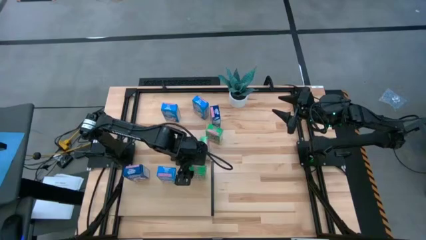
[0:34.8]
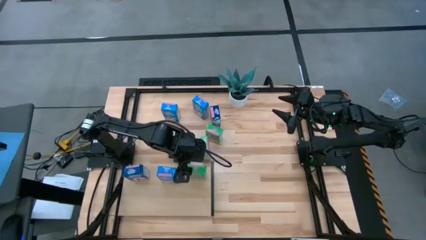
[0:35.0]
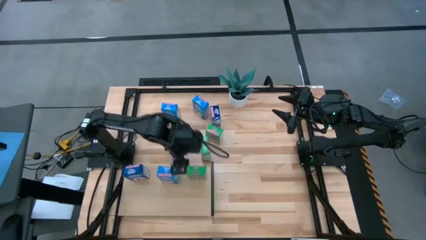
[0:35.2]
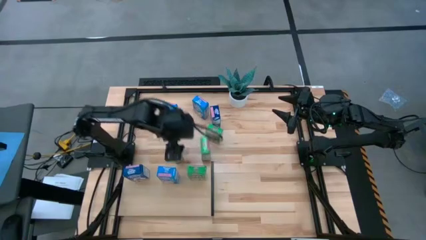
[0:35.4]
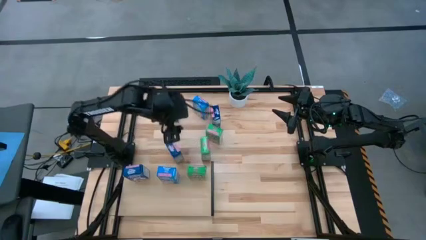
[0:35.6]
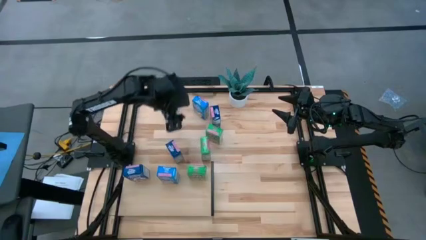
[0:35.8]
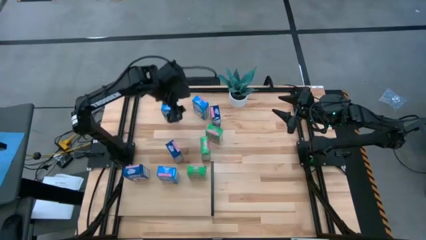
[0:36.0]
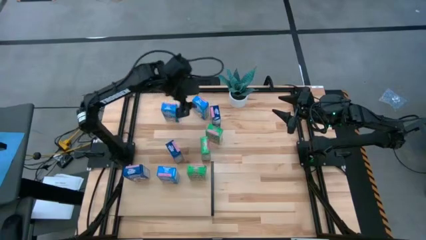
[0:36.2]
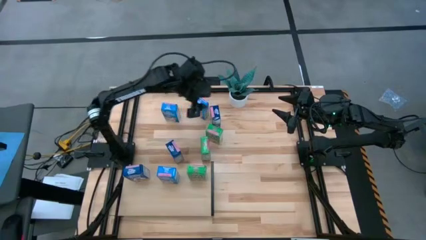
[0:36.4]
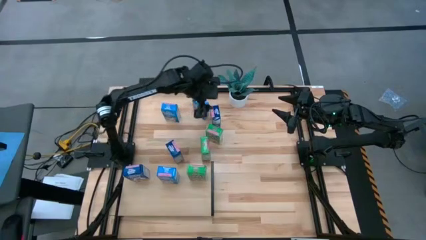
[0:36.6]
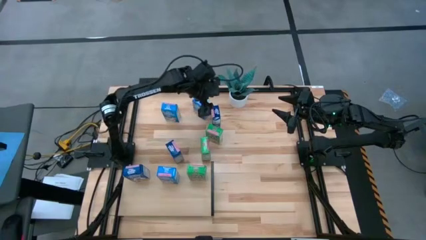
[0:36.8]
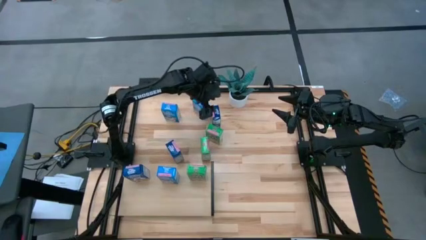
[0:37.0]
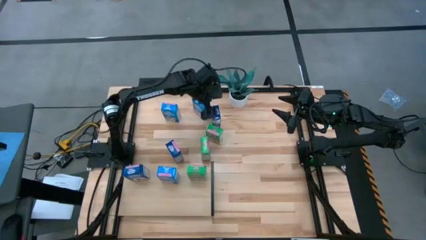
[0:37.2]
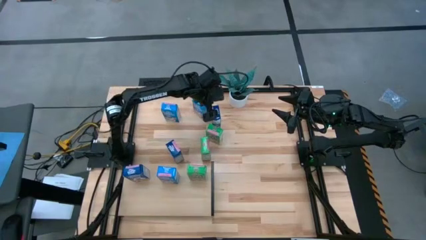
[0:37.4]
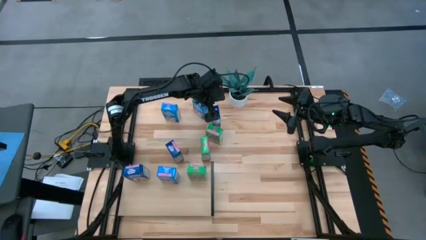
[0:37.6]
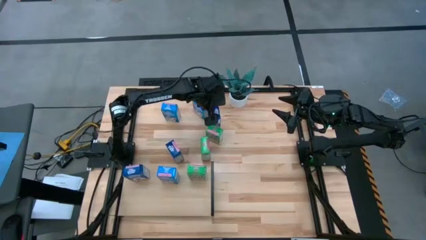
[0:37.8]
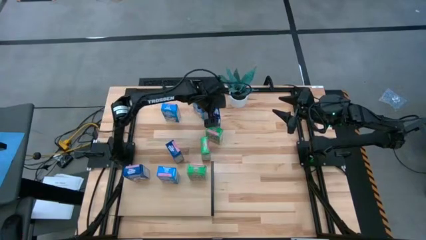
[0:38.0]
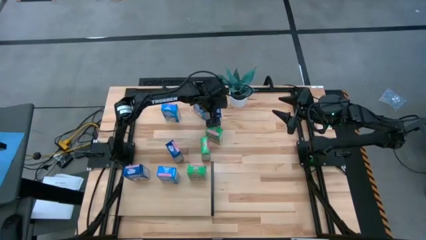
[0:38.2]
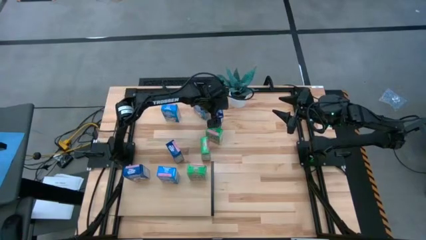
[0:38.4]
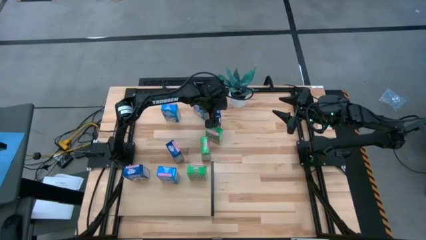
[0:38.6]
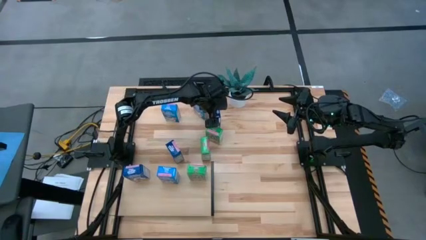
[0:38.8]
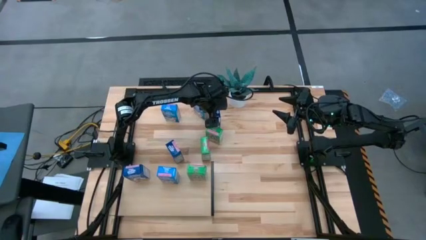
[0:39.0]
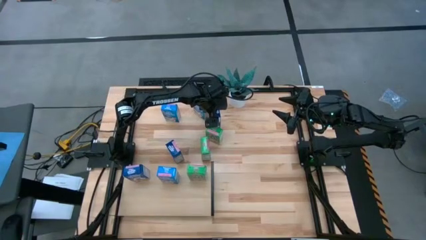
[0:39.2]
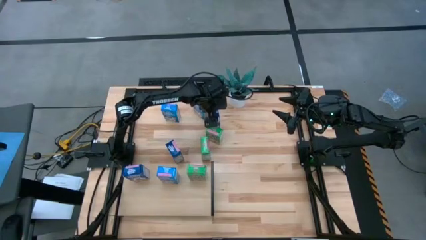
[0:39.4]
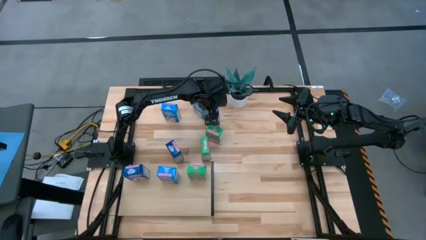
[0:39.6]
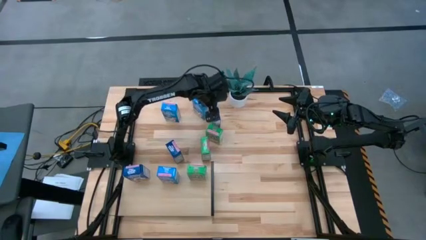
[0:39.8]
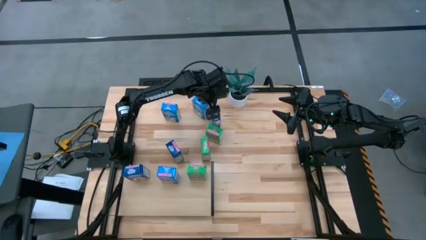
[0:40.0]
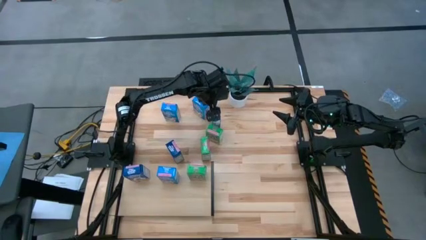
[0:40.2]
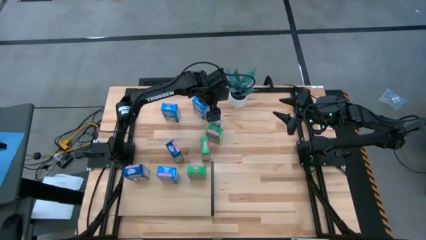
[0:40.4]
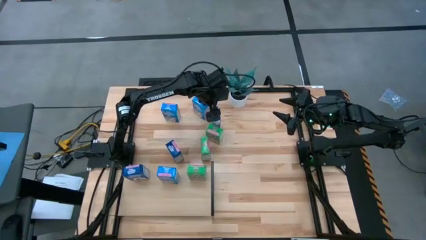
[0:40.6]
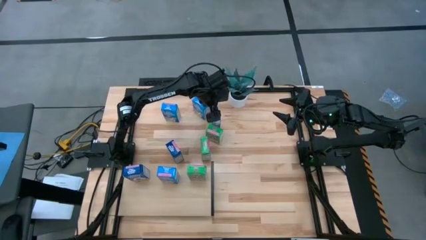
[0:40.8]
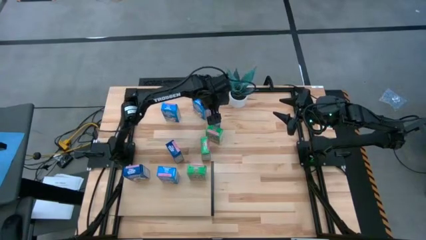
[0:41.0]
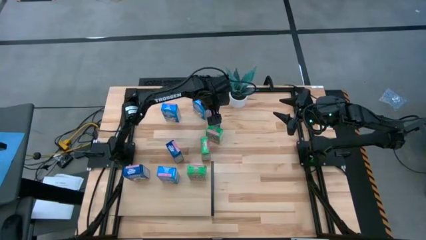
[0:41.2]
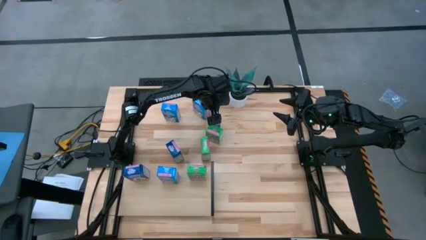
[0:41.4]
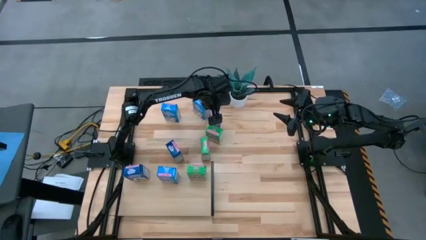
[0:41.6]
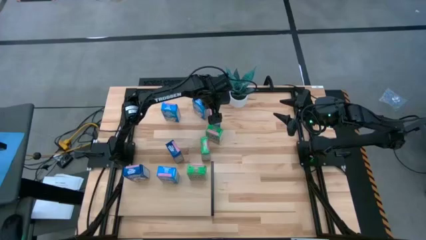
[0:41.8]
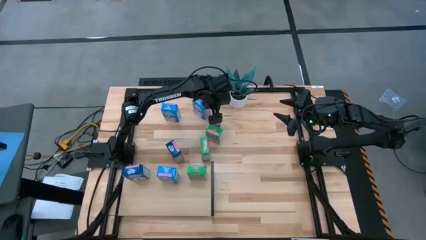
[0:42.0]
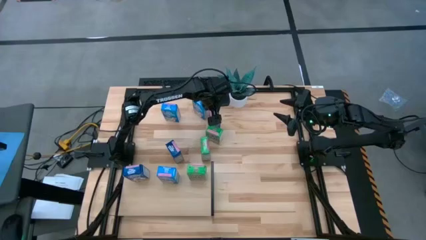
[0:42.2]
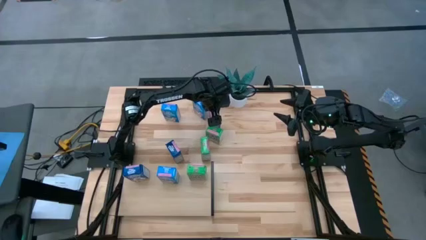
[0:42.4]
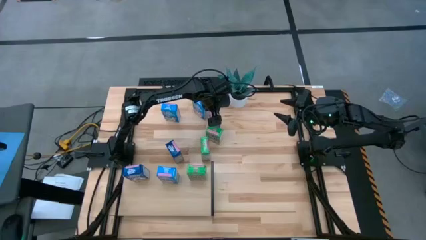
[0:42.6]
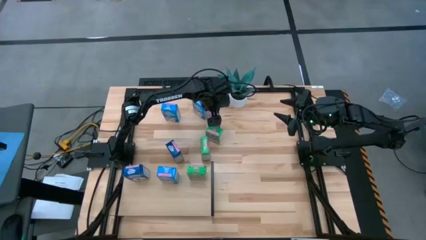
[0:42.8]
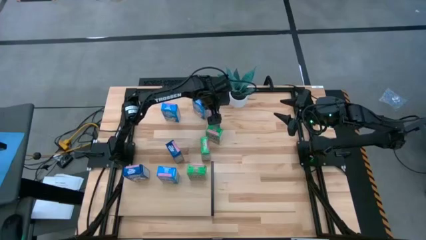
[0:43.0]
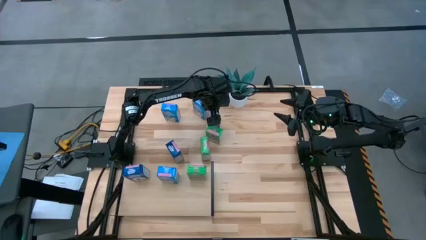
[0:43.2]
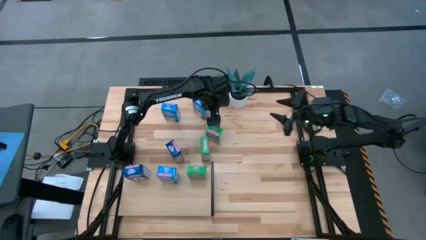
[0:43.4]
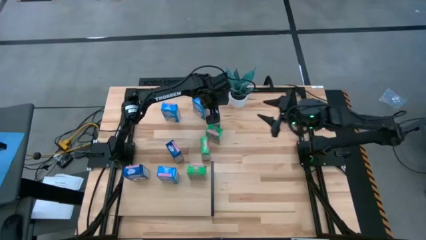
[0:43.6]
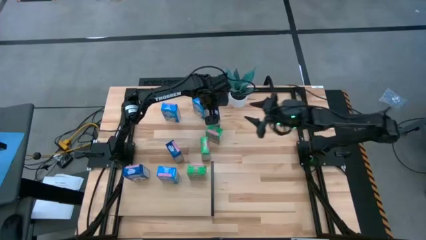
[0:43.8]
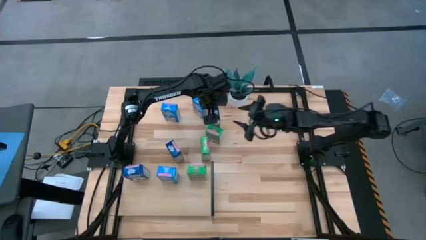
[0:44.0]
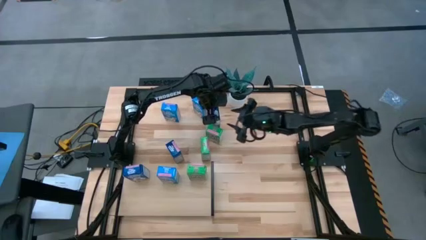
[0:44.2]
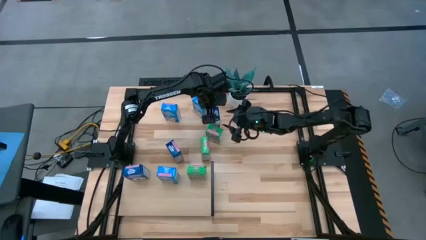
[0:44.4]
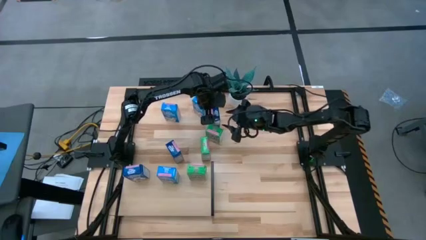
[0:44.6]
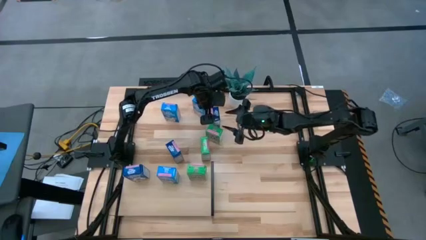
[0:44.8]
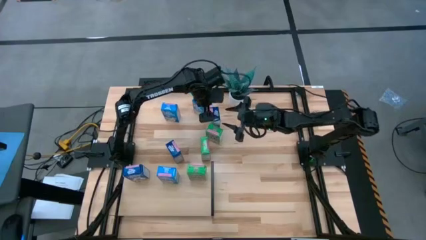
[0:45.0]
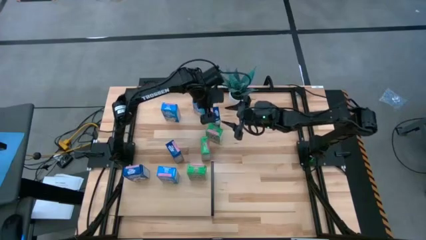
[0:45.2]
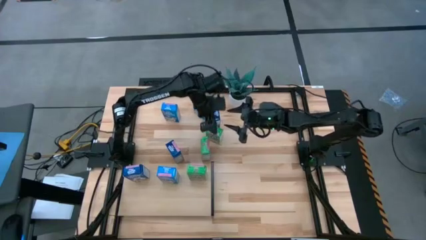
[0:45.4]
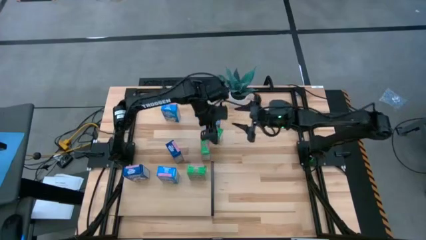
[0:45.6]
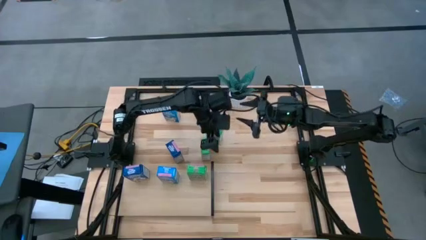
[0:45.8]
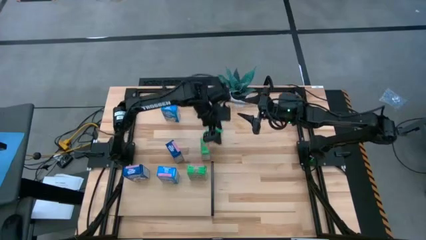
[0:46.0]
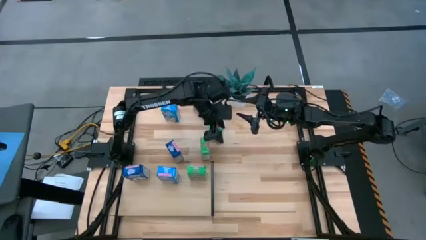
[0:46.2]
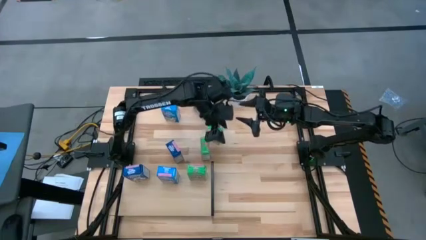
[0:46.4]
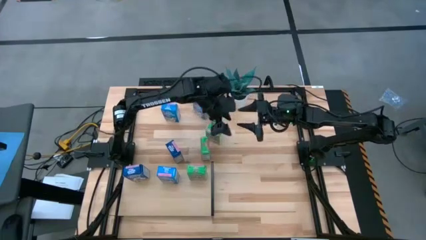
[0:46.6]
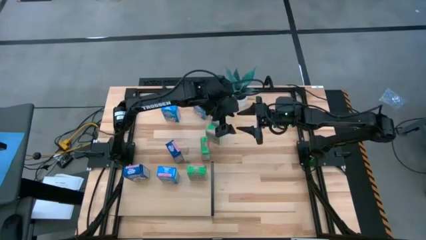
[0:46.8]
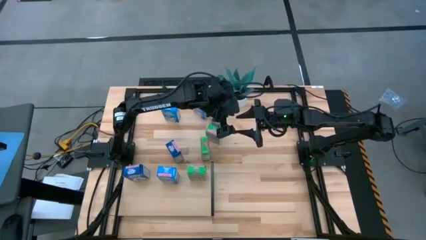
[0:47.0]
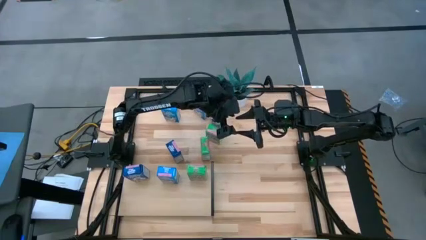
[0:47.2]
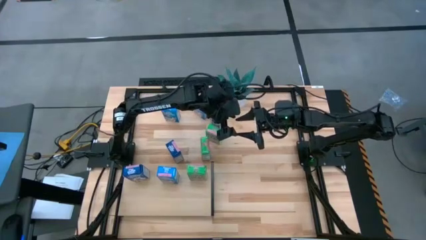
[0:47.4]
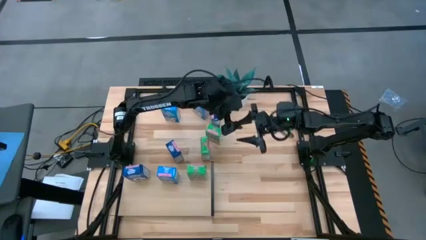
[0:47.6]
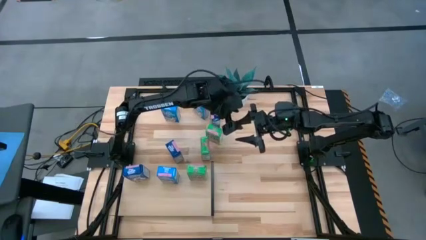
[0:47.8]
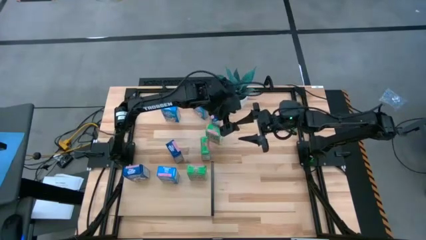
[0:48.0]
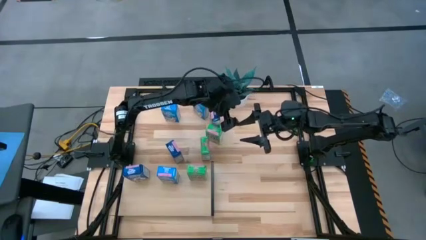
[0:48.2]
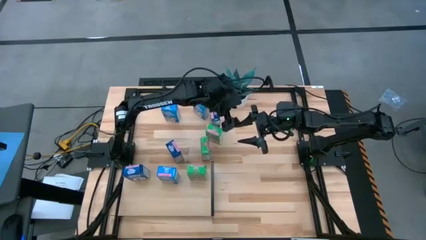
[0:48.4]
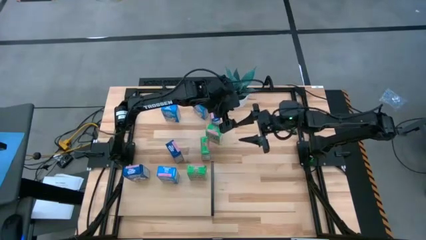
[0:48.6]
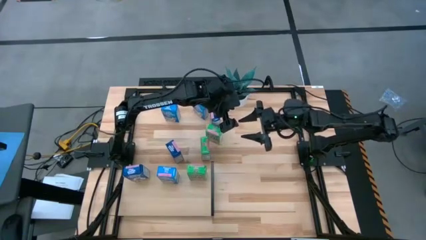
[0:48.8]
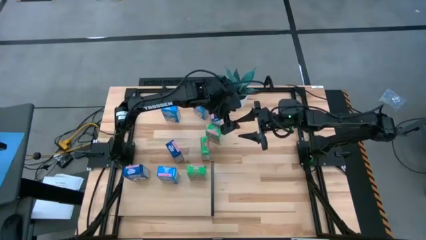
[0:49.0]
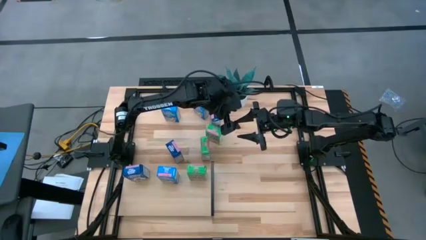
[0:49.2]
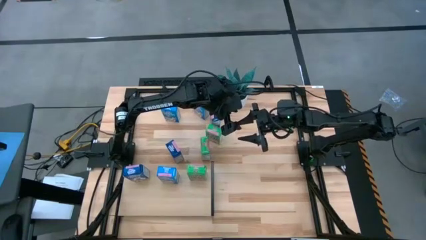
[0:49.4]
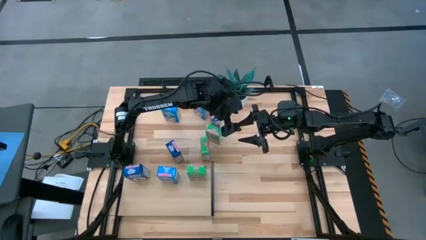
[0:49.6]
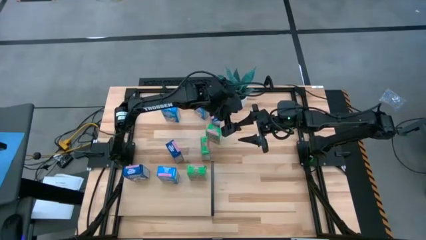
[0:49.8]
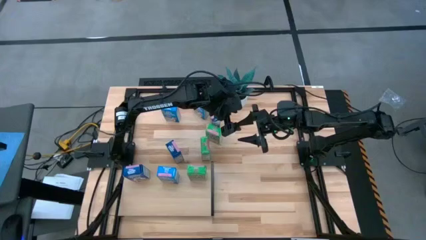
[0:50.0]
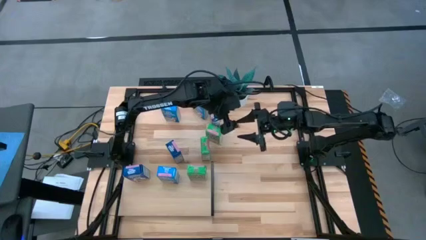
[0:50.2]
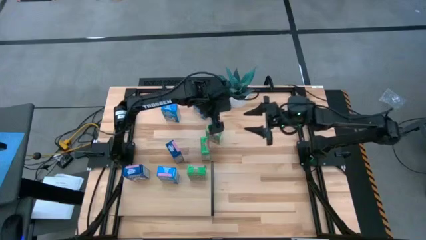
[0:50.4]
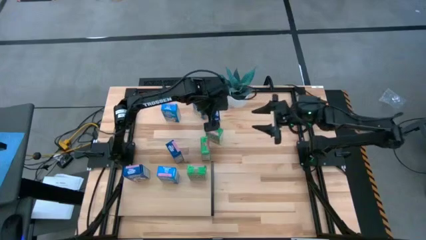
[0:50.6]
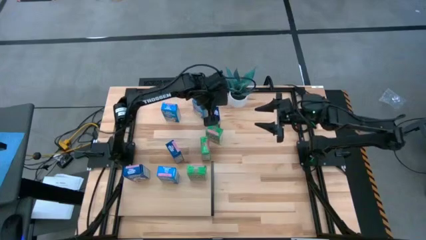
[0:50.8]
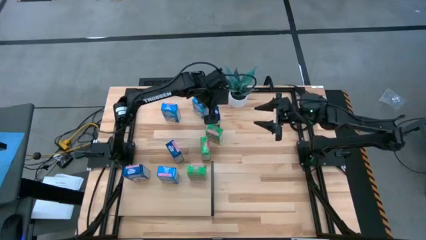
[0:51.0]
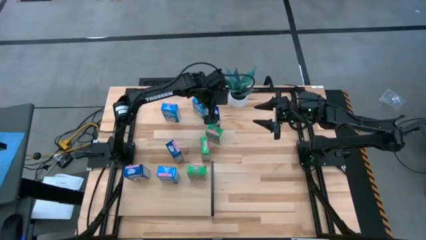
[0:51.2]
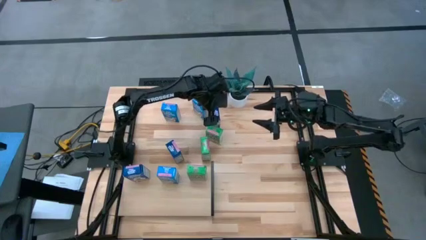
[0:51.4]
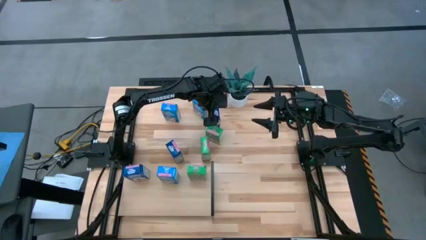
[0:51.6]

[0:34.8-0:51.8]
Task: Stack cereal on shelf
Put the top blue cereal box on the shelf aligned with the other blue cereal box
